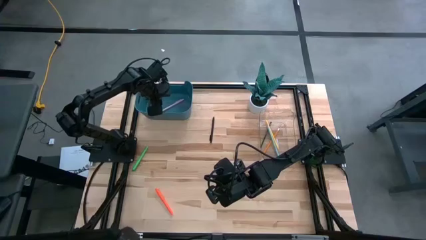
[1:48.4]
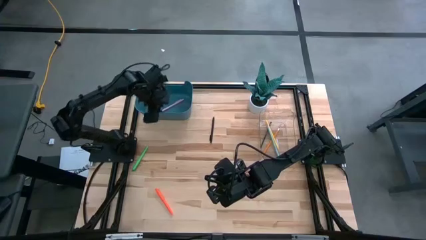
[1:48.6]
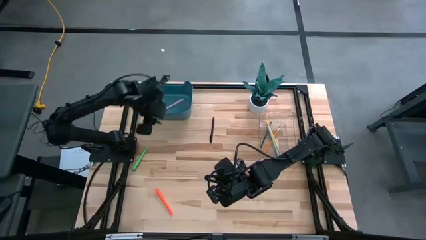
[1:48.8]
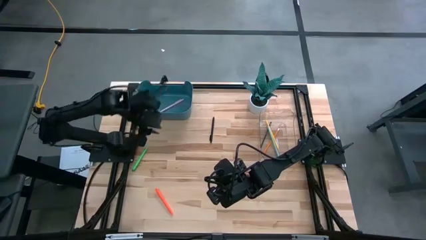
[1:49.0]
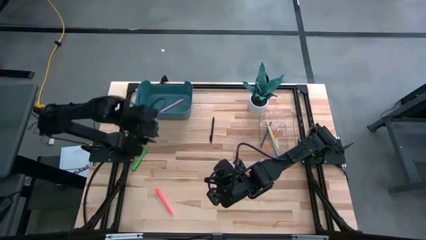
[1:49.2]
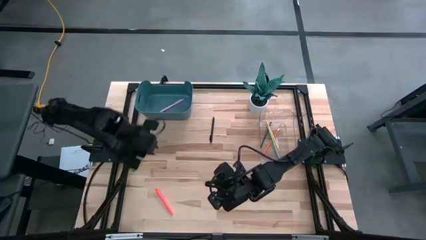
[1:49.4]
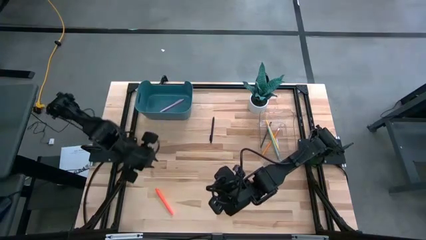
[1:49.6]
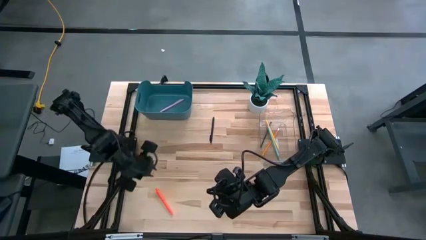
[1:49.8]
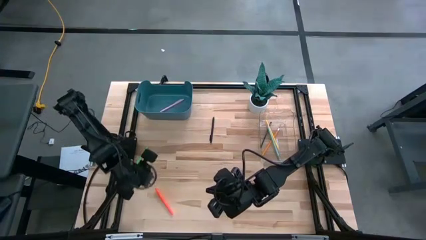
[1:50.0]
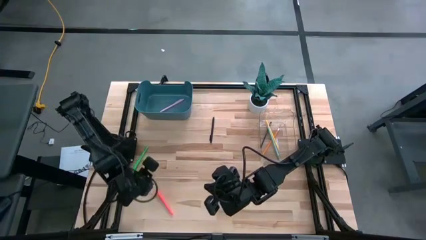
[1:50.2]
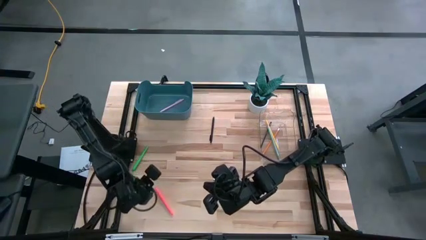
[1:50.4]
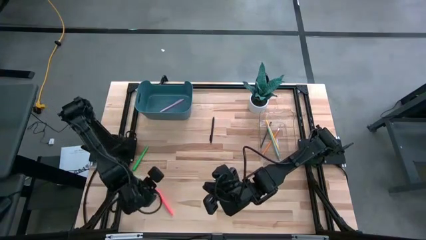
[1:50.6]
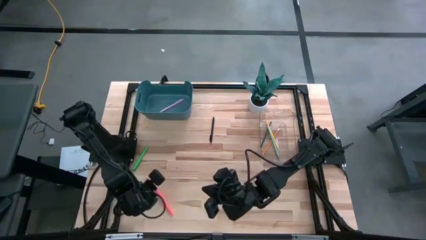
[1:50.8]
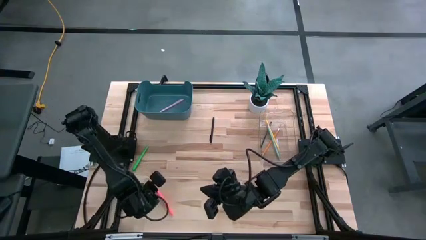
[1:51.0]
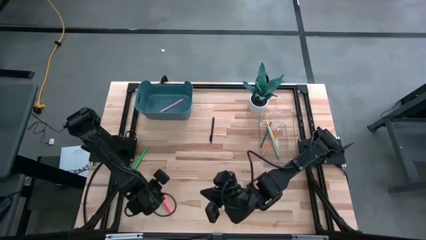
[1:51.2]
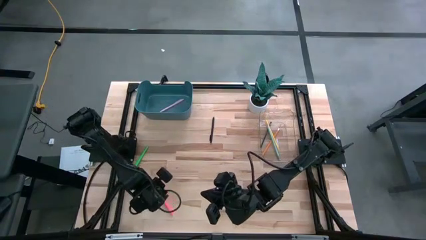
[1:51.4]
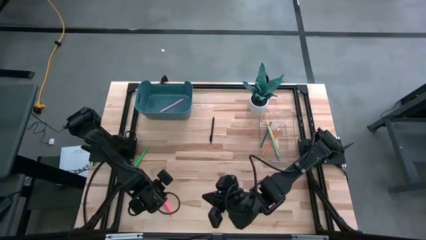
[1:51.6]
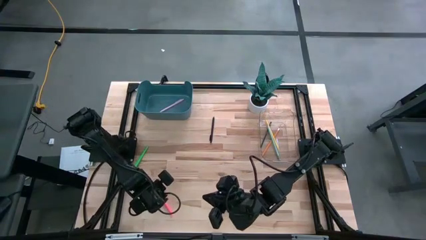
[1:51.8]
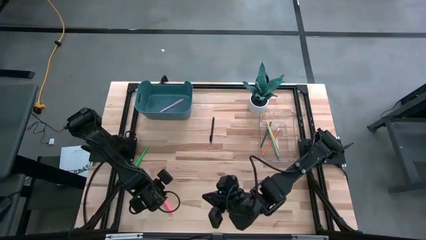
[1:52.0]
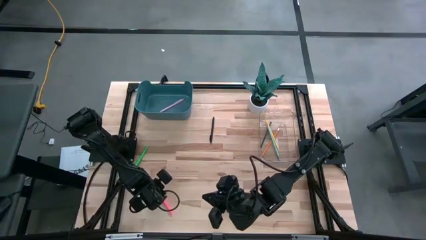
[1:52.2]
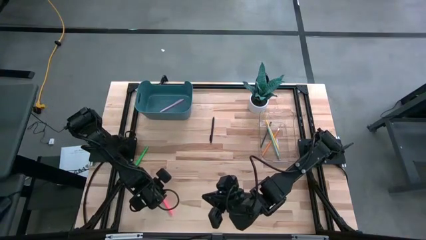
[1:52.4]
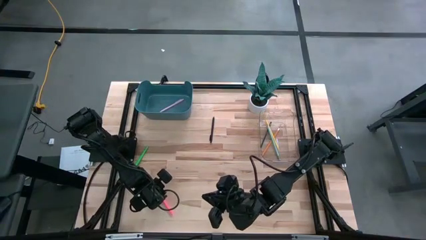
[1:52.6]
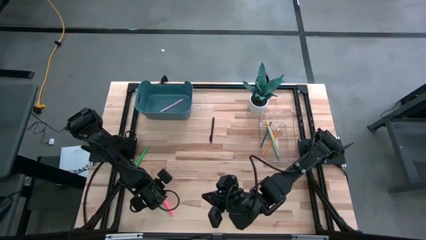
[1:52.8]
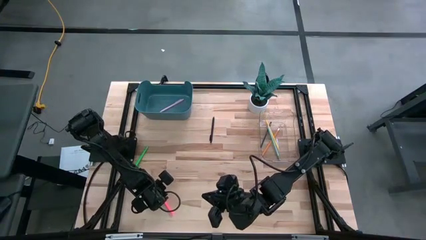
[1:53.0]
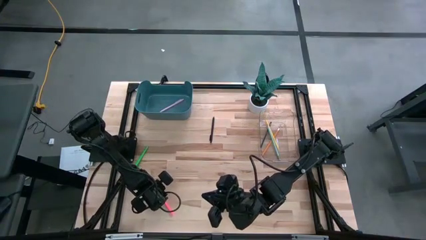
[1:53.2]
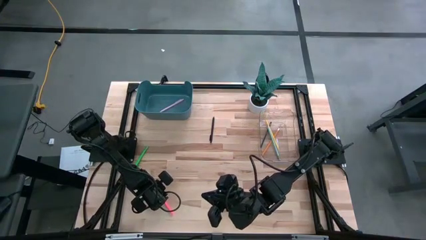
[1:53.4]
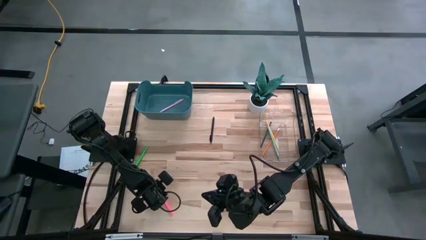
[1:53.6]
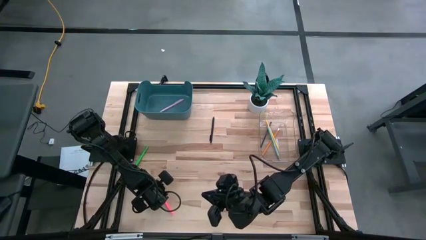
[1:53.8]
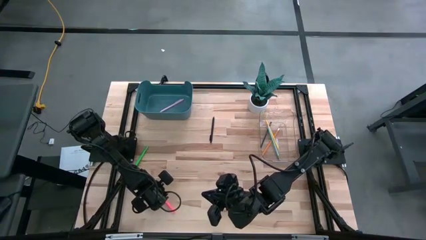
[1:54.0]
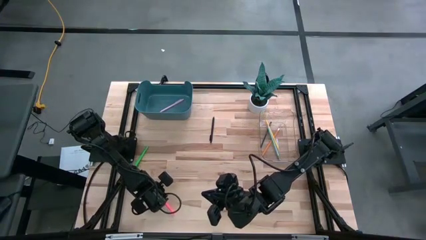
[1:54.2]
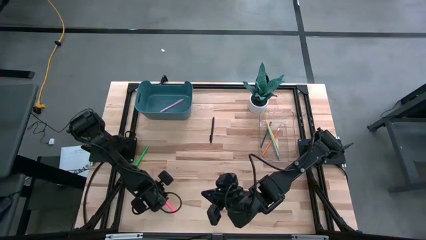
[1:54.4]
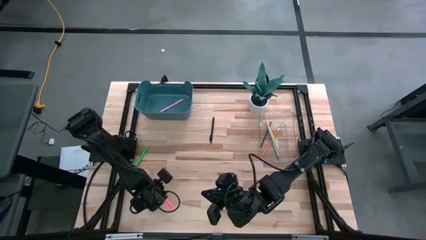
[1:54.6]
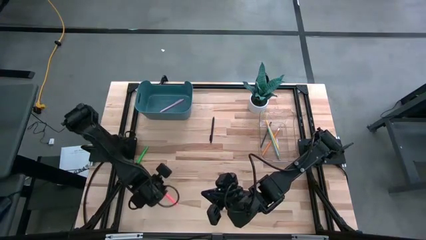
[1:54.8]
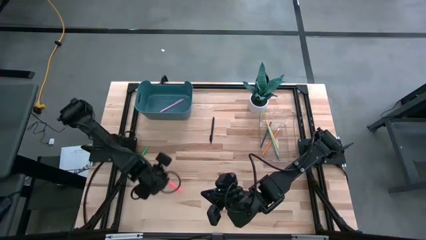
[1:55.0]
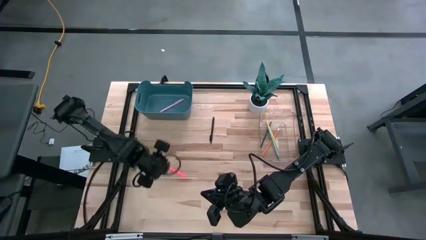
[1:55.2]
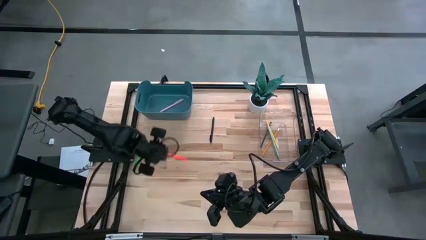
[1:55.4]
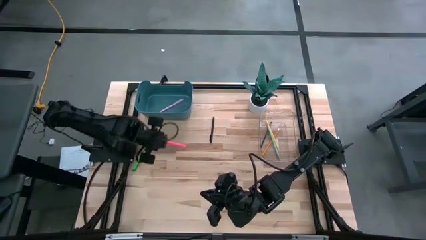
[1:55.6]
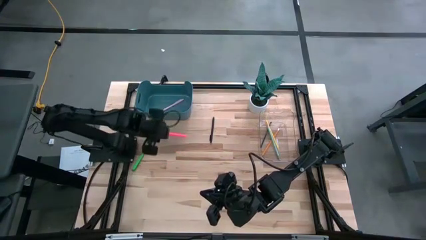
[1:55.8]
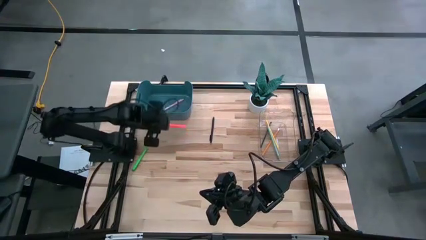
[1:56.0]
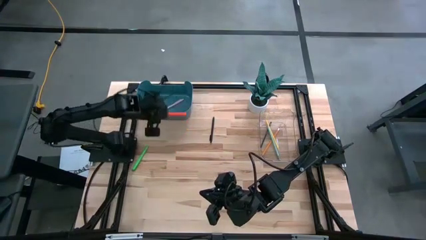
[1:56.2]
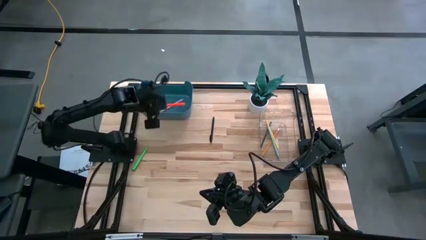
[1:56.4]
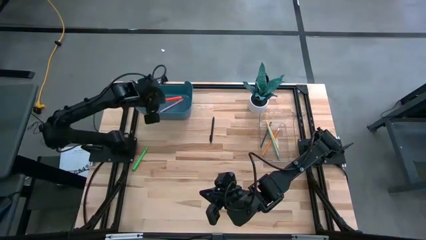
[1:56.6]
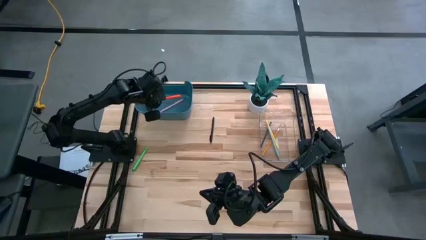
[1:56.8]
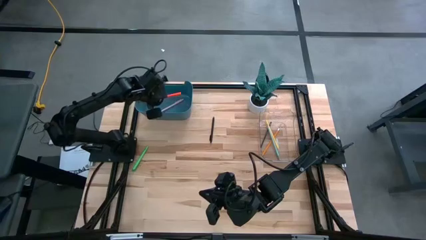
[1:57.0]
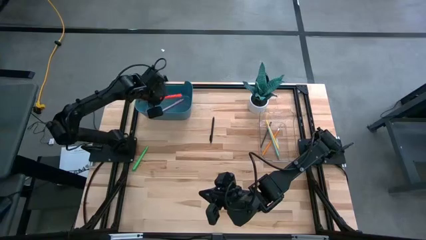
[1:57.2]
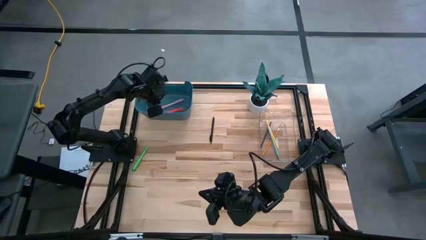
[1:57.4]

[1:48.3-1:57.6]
Task: Sort pens & pencils
Put the orange pen into the blue bin

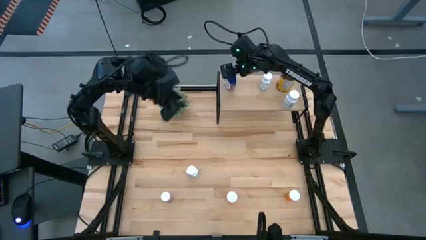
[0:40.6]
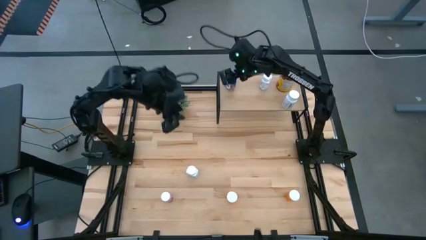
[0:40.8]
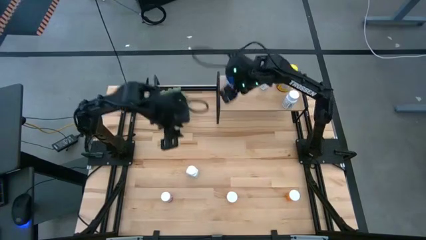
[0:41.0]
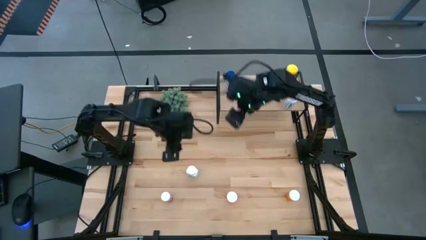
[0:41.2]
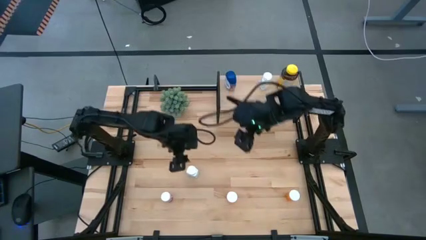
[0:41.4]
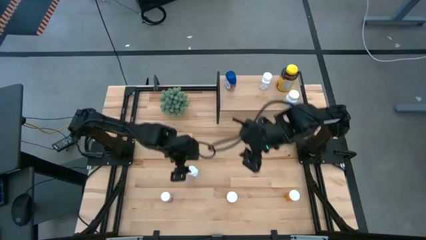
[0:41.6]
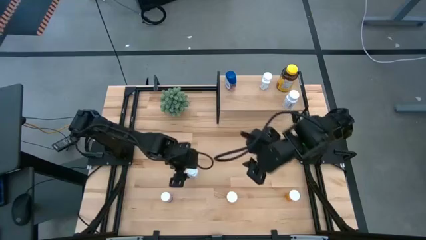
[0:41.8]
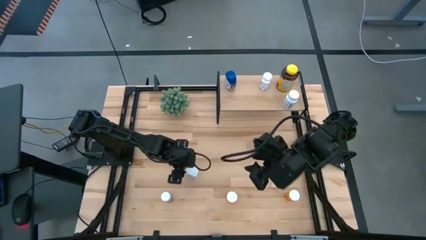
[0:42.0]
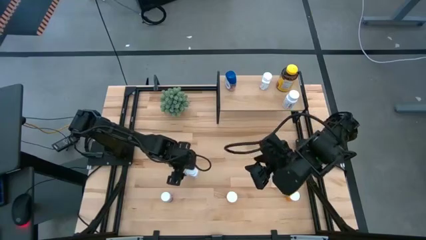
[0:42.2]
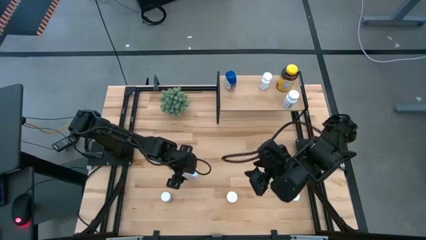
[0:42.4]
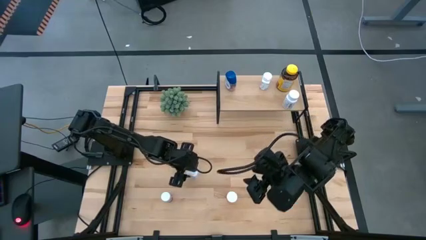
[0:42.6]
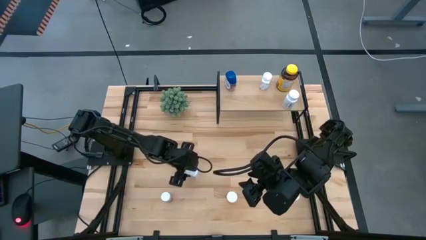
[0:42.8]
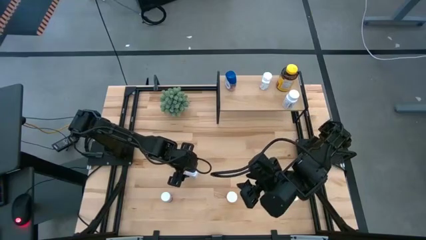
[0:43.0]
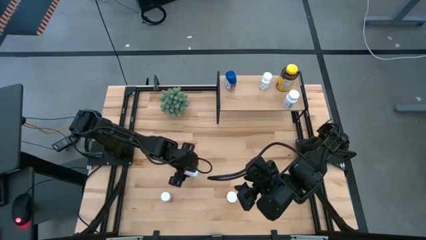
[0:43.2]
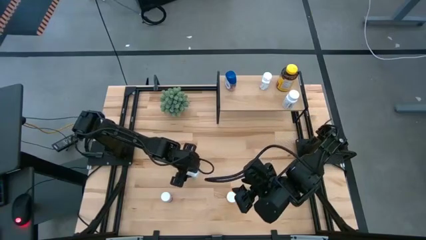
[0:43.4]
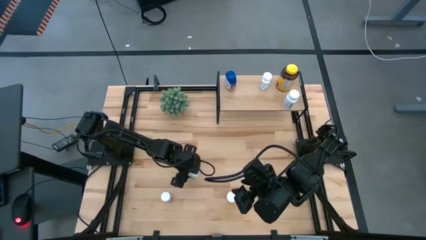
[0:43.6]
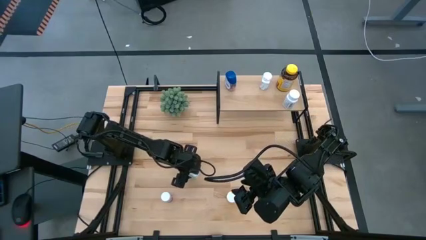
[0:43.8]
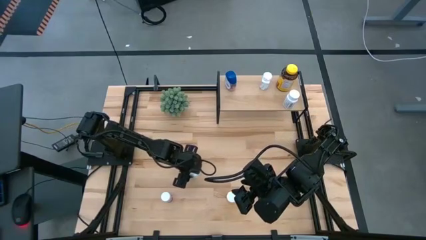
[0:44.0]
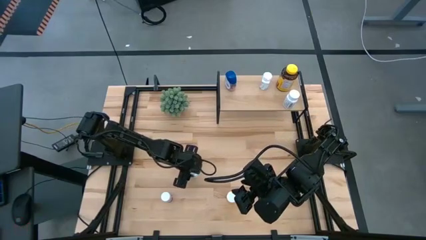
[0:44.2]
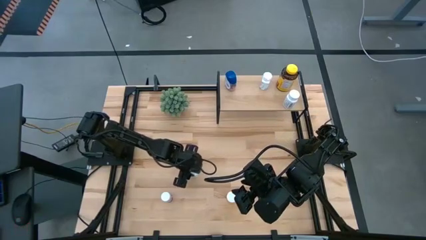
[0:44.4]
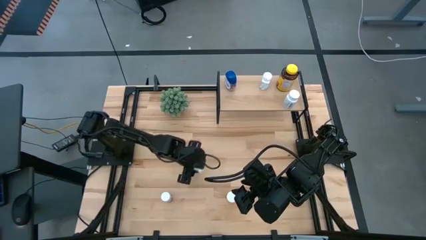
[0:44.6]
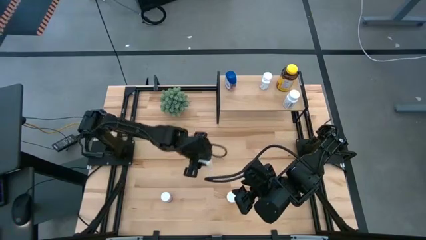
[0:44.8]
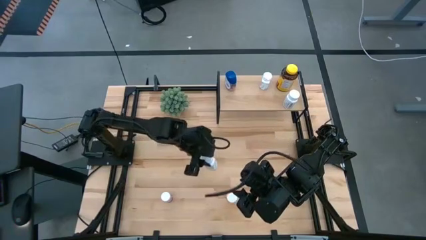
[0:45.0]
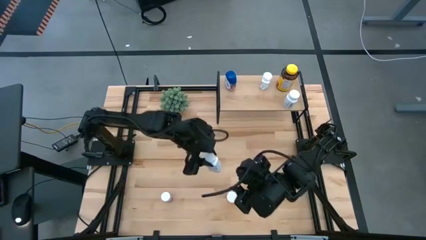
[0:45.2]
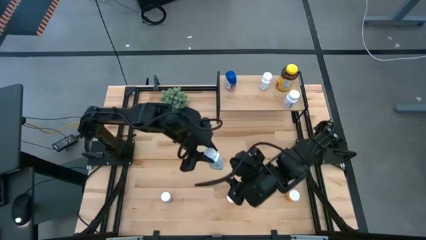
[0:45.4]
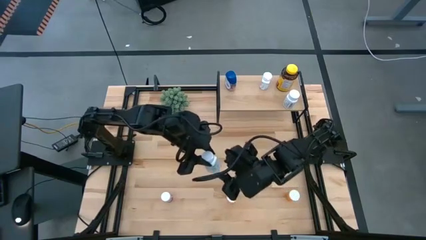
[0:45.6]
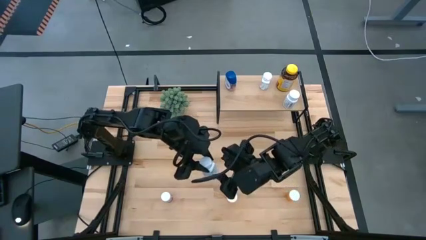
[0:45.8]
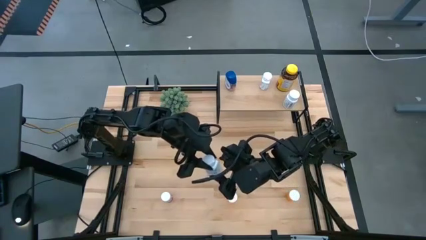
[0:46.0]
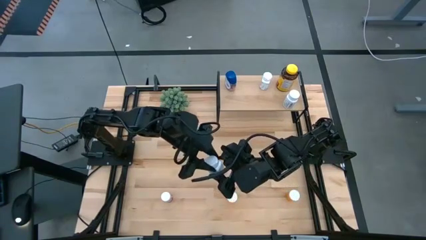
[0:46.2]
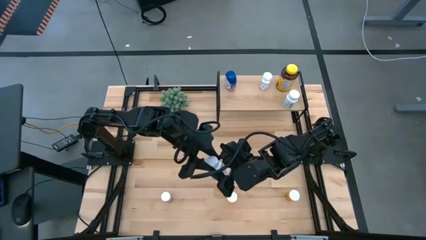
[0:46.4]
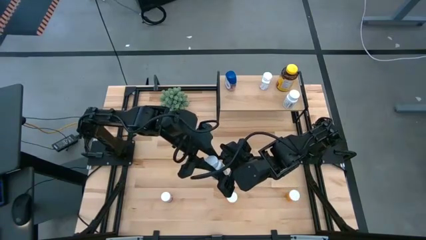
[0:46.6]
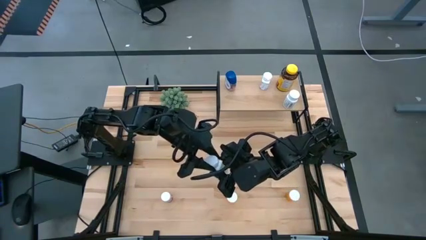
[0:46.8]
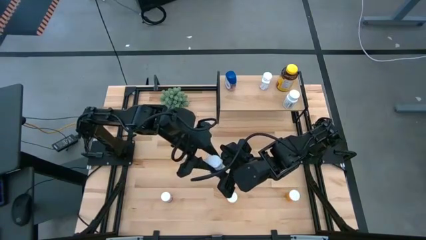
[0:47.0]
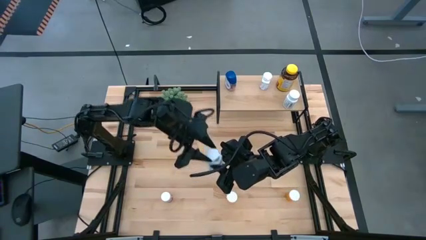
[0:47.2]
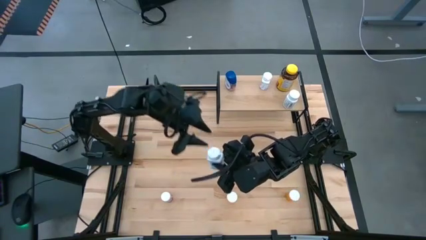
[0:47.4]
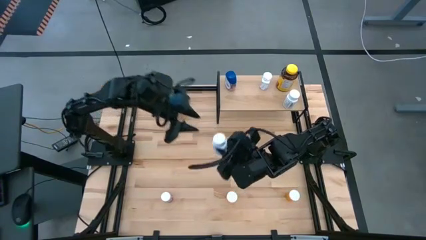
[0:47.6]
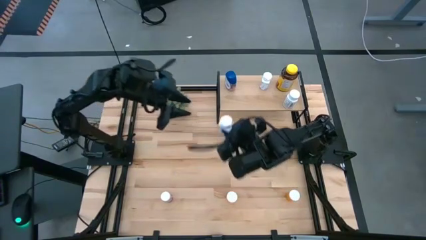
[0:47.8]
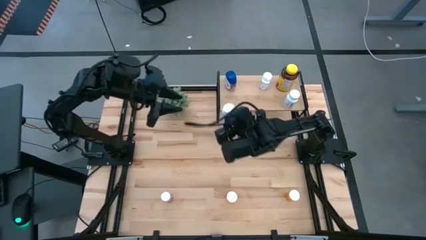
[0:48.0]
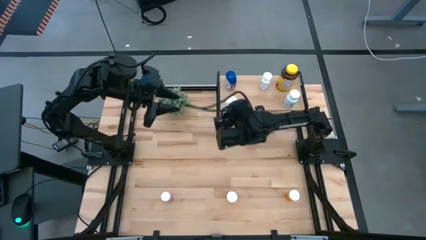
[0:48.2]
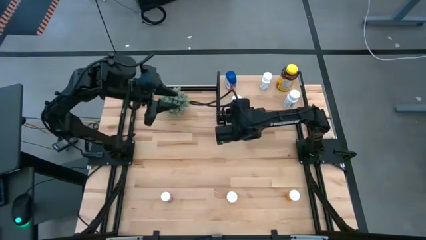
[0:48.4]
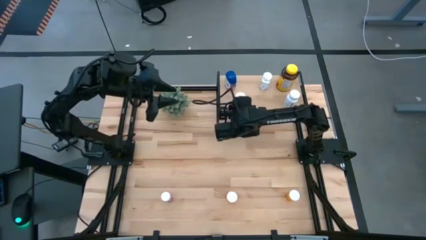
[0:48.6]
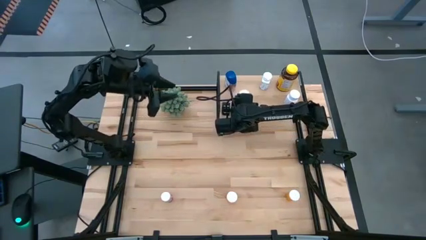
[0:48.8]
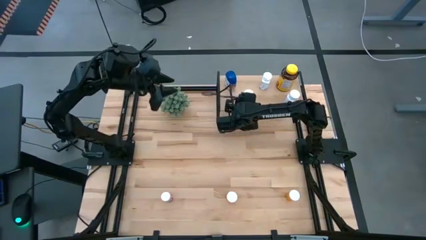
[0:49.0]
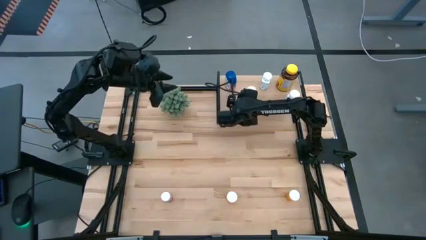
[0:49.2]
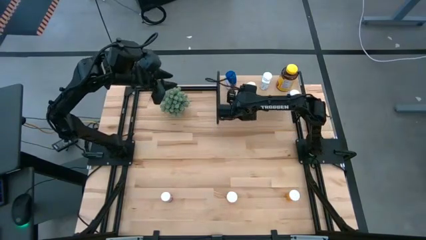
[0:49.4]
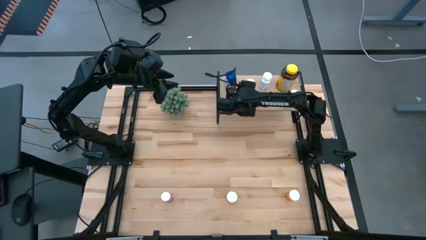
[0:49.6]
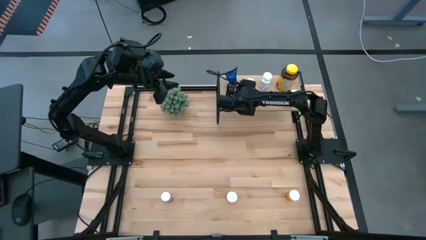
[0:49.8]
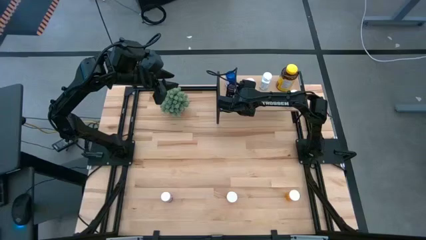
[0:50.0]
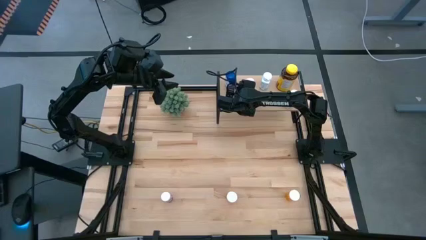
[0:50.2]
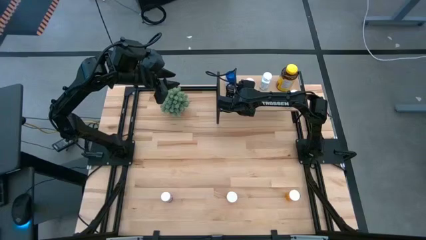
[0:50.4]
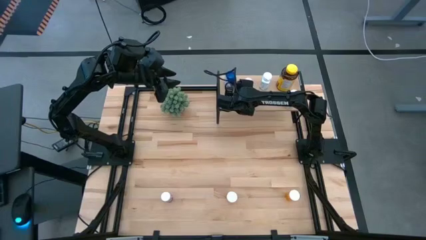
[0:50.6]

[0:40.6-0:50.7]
Task: Pick and place medicine bottles onto shelf by color
Put the white and blue medicine bottle on the shelf
